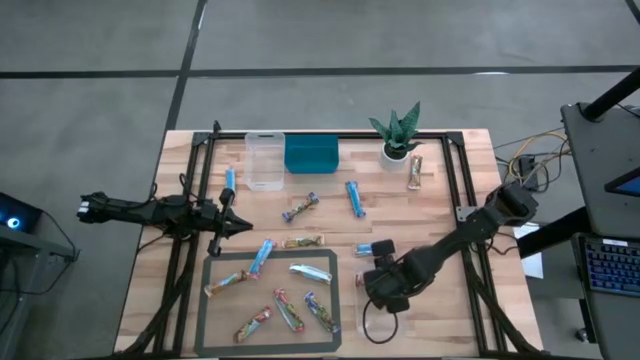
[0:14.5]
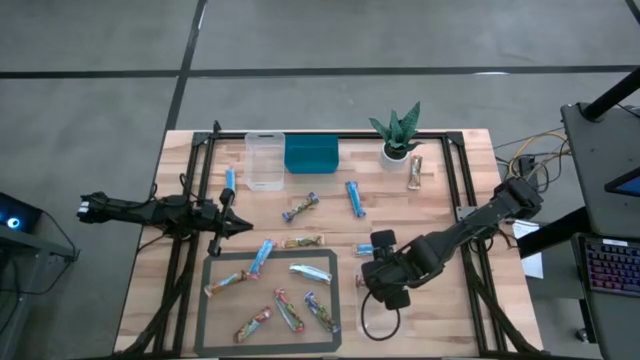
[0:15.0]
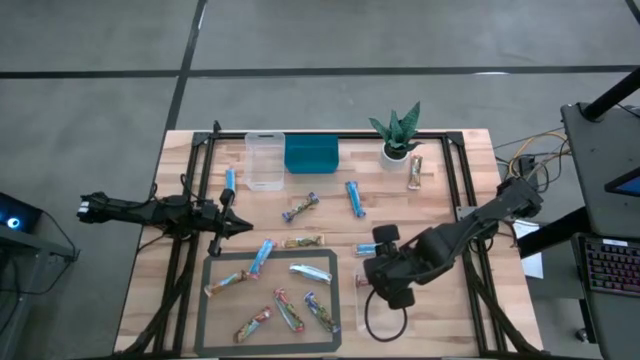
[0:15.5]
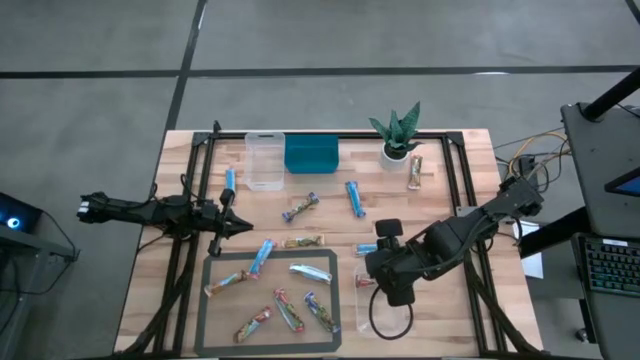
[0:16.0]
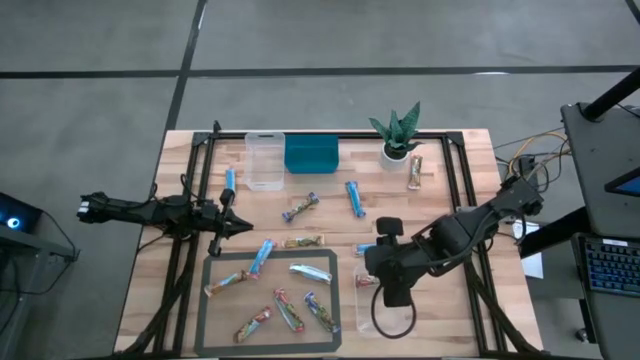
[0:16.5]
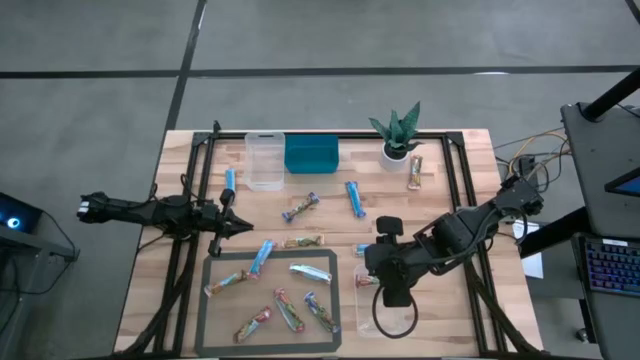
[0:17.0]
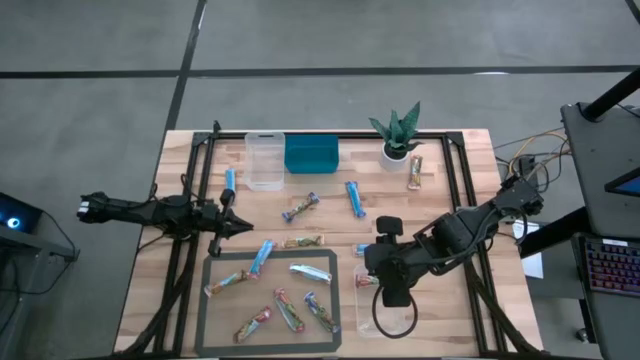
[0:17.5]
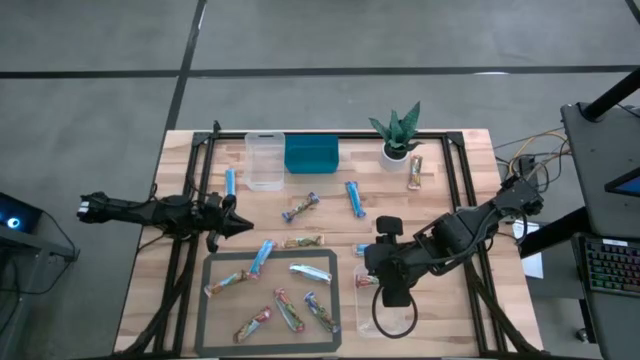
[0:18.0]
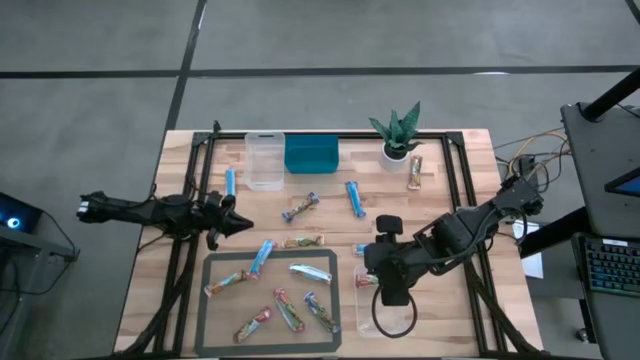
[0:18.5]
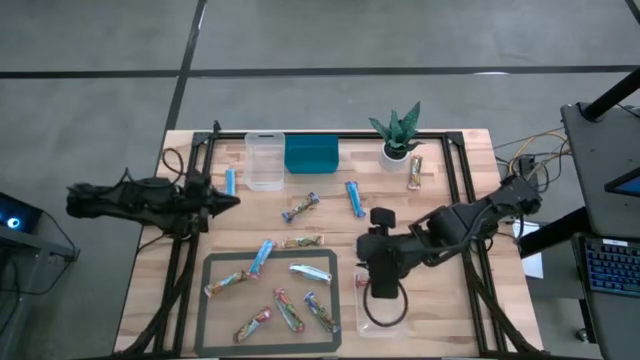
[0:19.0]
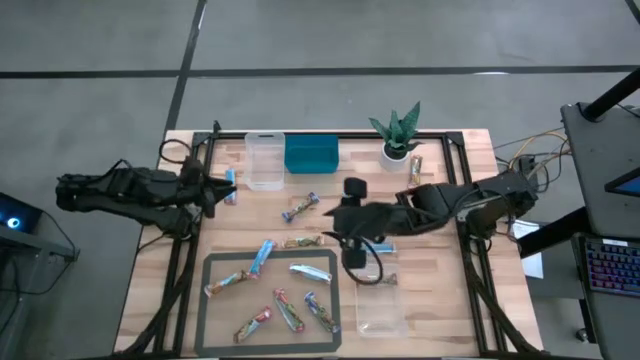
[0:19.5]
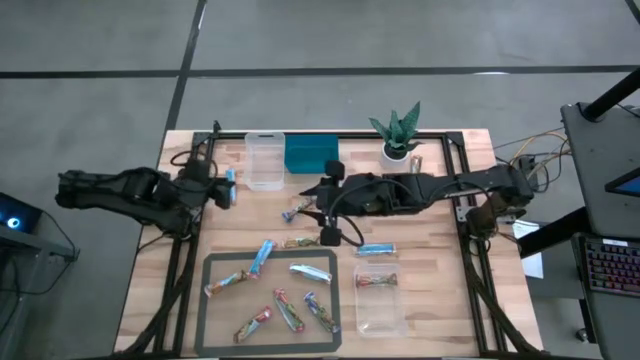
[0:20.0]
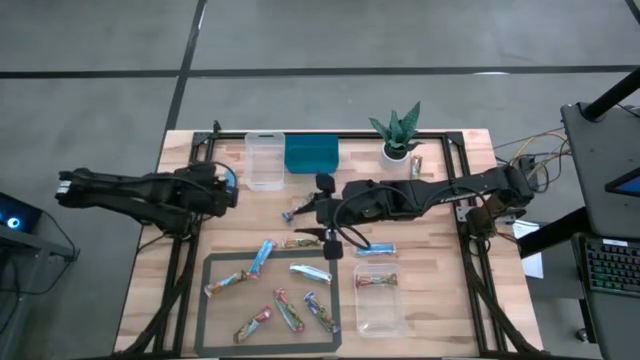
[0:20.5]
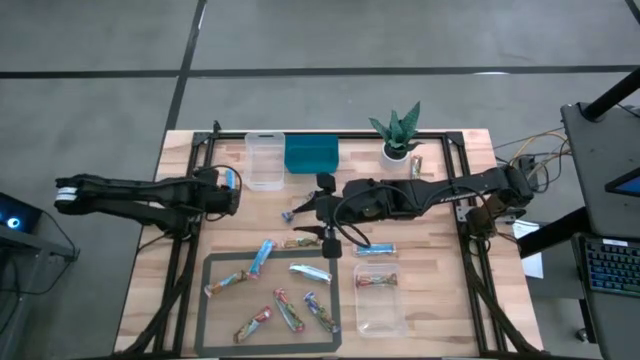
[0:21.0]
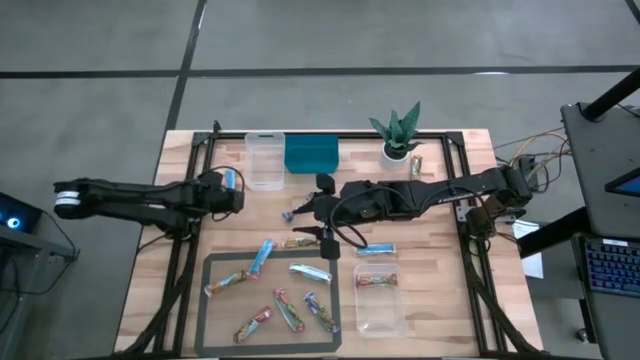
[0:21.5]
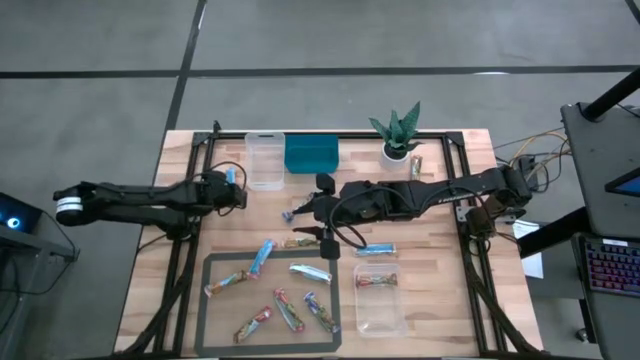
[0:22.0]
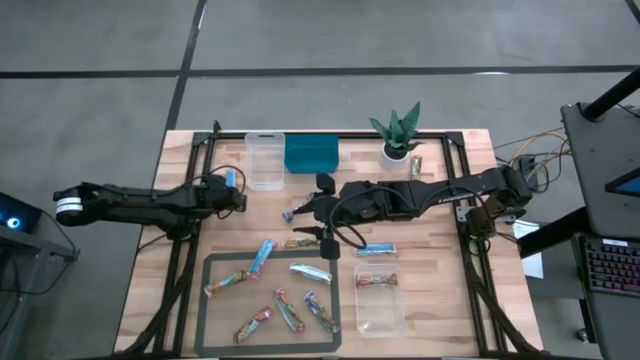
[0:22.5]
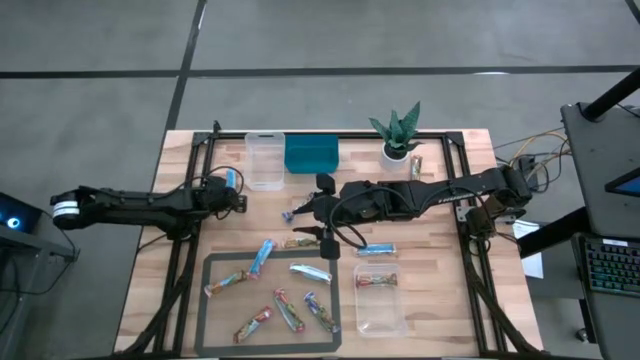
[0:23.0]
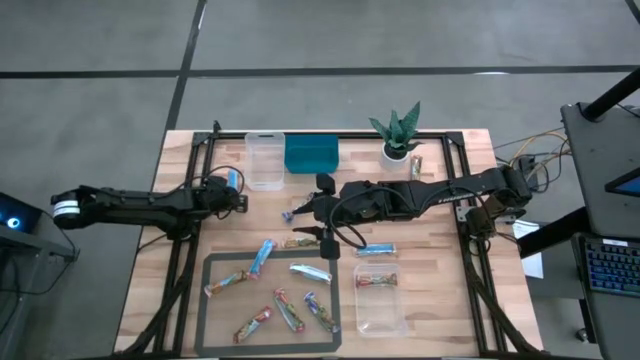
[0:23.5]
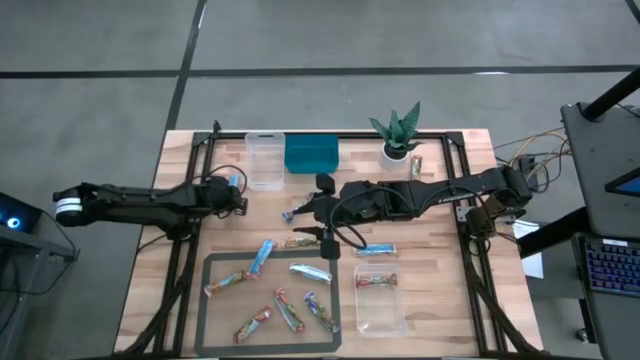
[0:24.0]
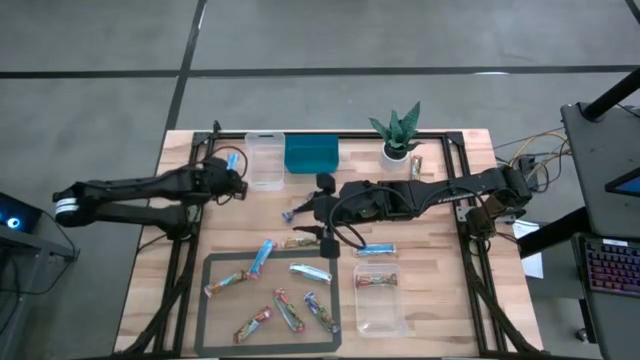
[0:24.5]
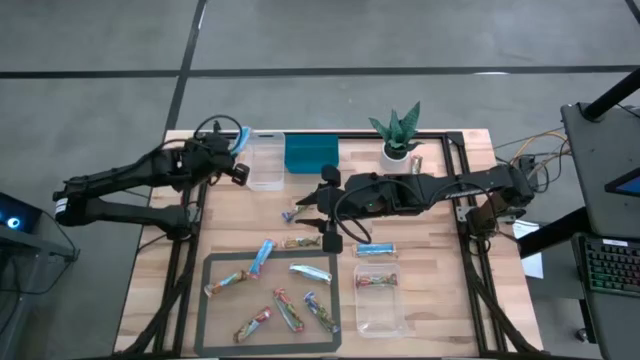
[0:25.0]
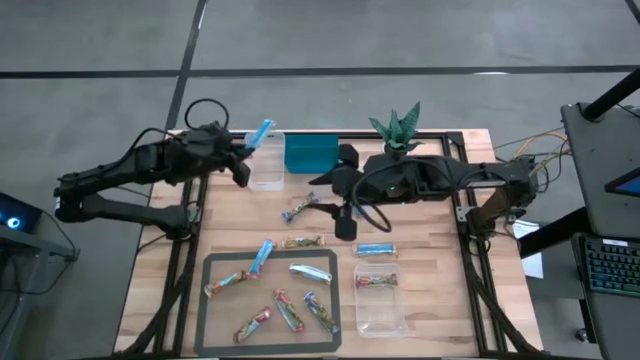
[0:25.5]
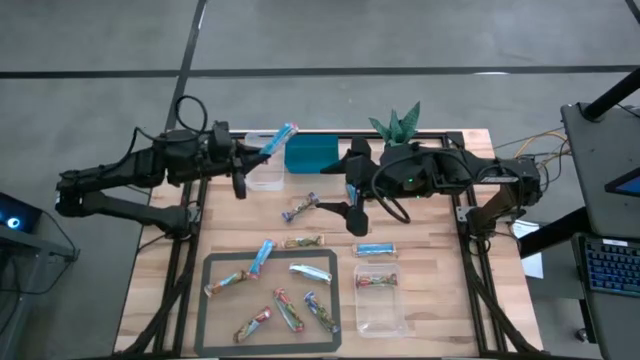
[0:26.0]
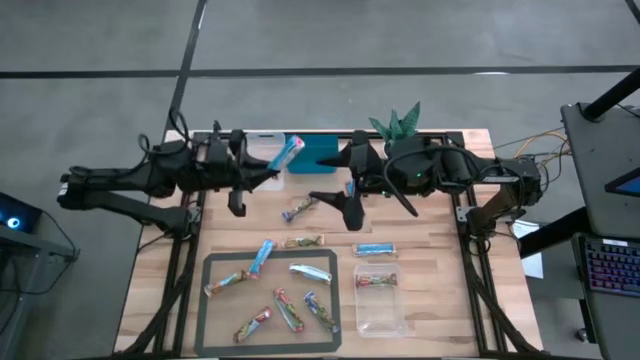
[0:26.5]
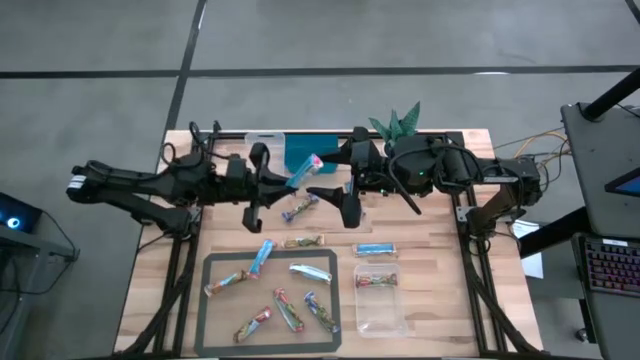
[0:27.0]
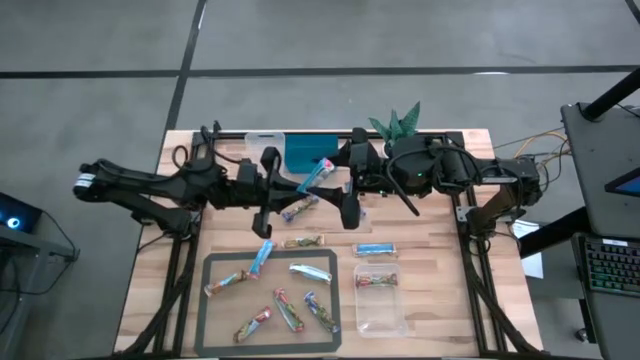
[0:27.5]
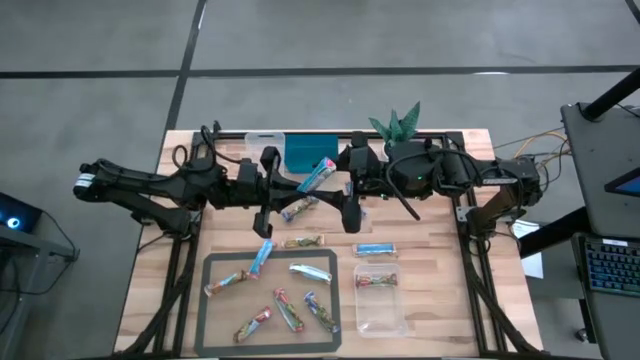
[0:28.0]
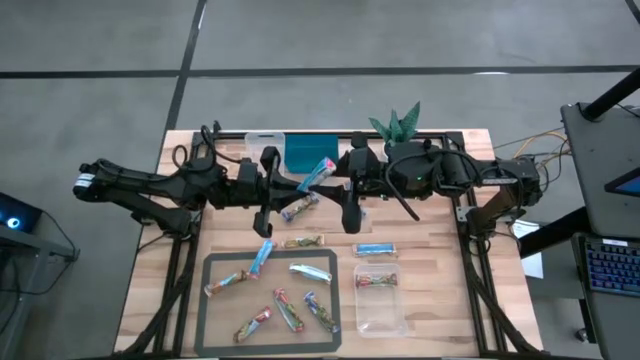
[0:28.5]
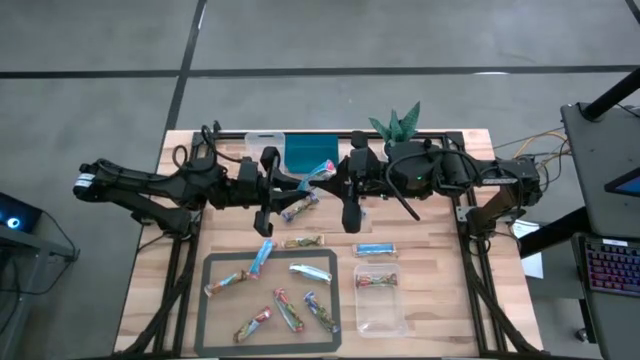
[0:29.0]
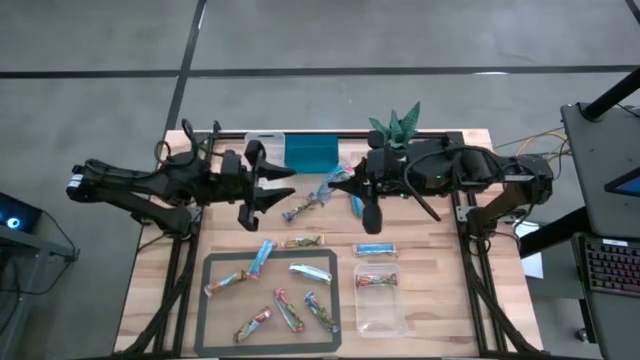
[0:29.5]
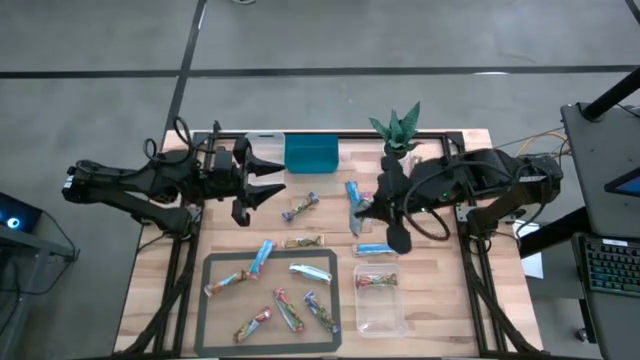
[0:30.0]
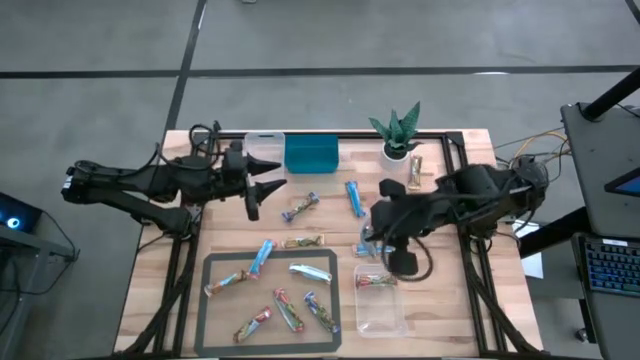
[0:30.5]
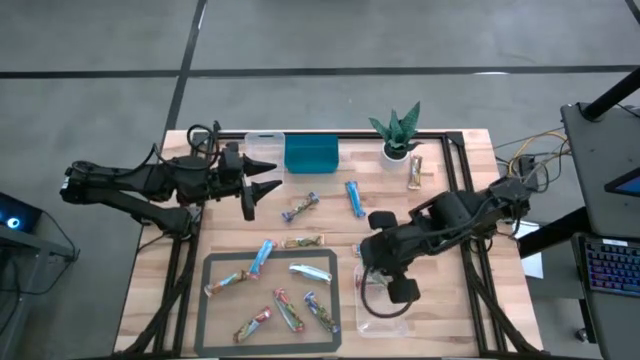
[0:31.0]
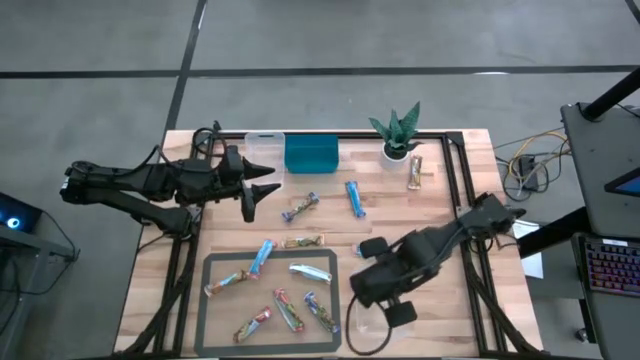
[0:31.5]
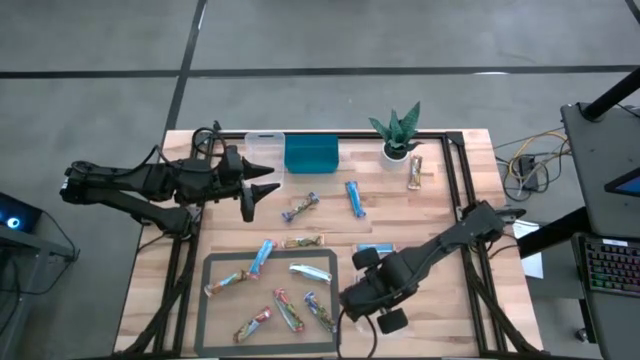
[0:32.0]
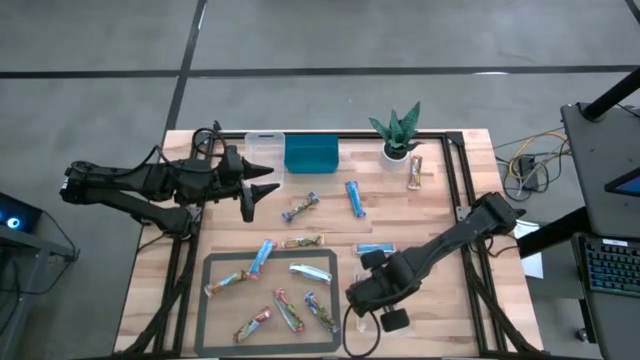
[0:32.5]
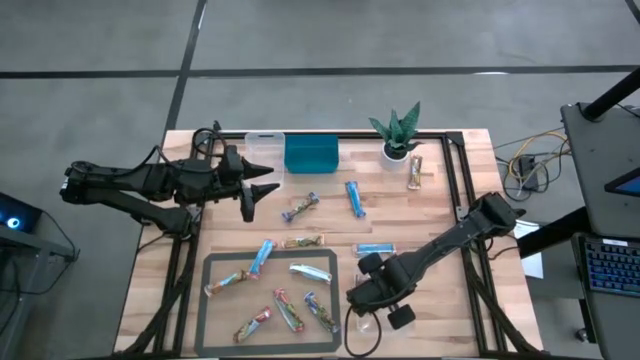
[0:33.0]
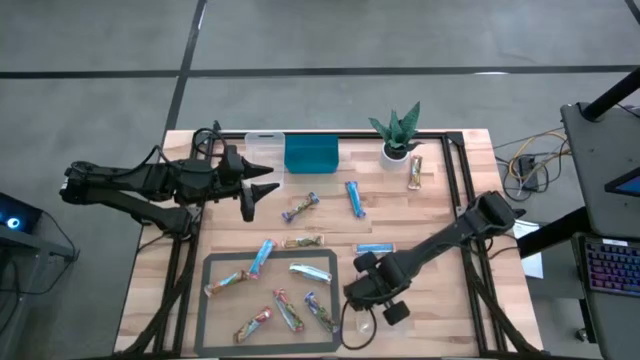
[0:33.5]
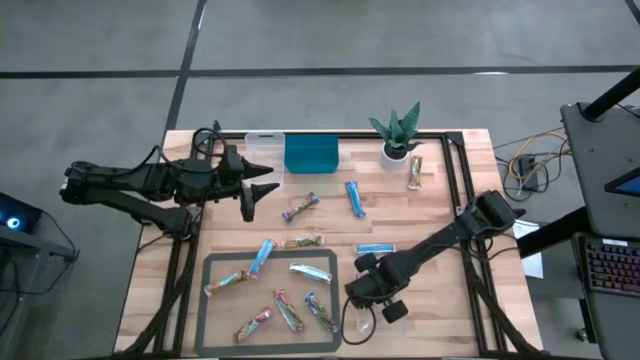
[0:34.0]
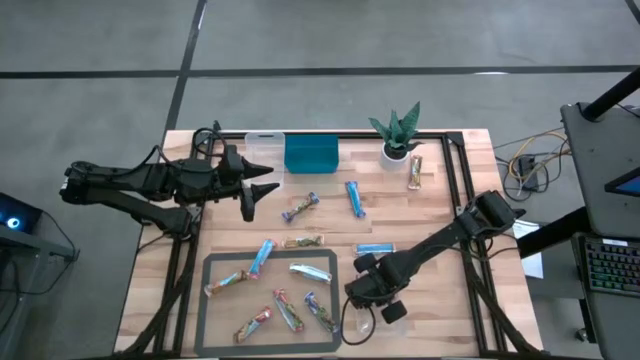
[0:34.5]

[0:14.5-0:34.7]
Task: Pick and place Granola Bars by type
Put the red granola bar into the bottom transparent bin
